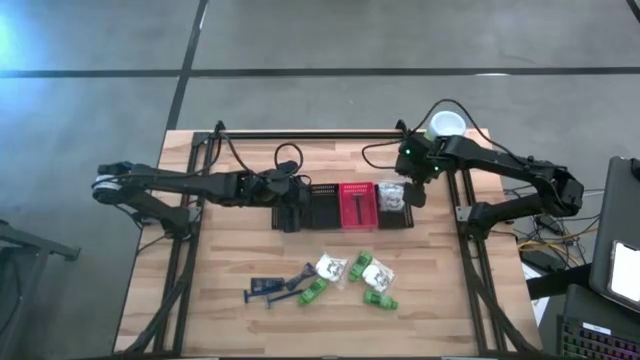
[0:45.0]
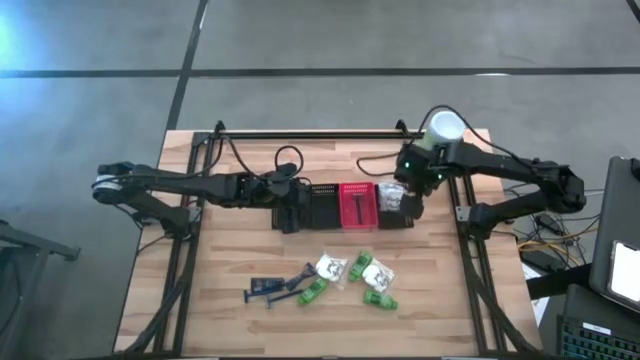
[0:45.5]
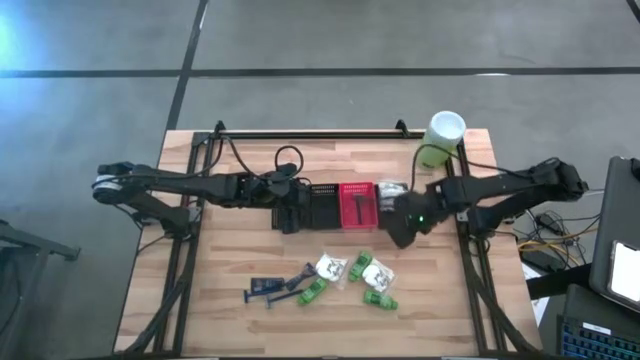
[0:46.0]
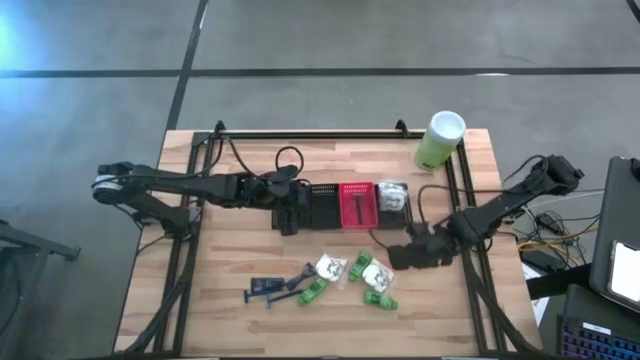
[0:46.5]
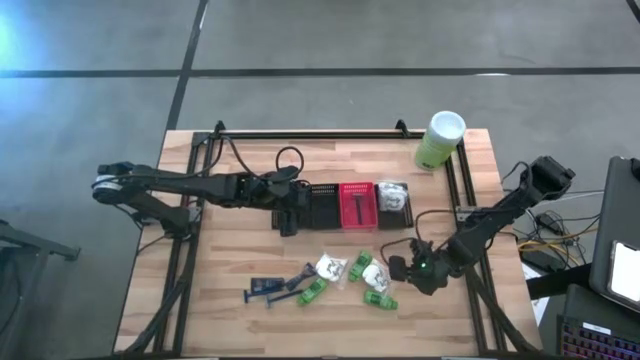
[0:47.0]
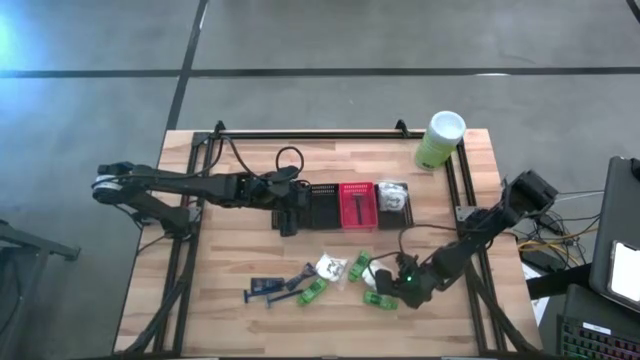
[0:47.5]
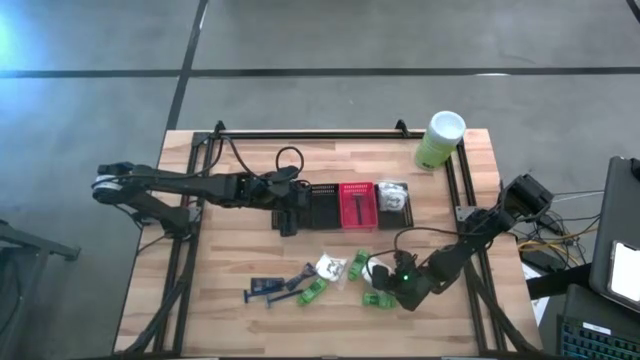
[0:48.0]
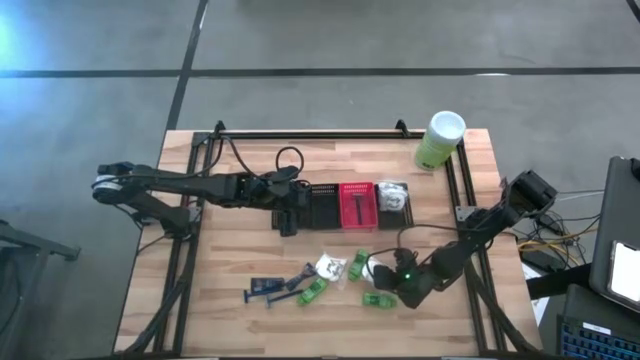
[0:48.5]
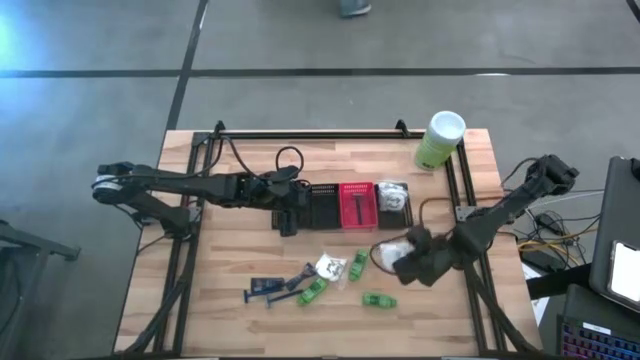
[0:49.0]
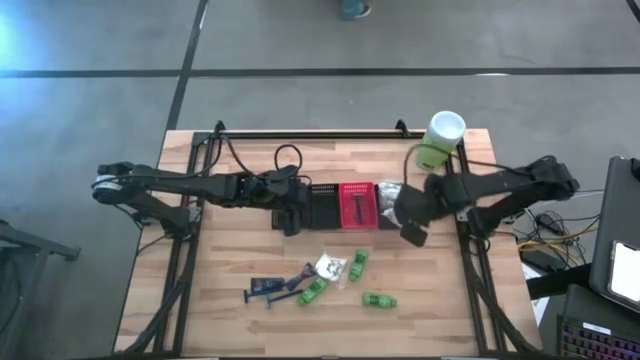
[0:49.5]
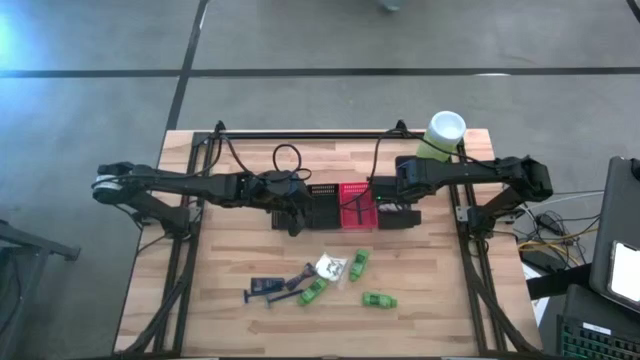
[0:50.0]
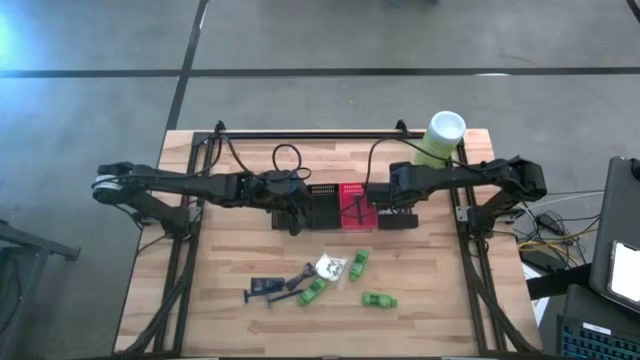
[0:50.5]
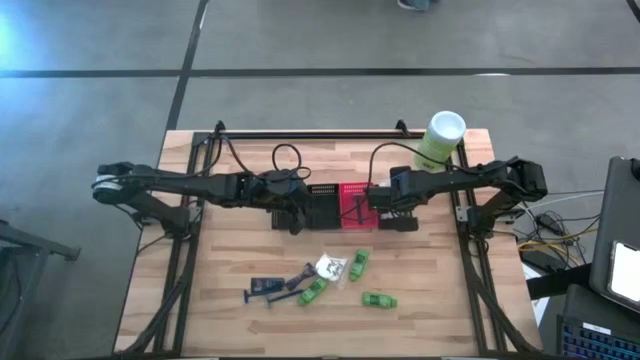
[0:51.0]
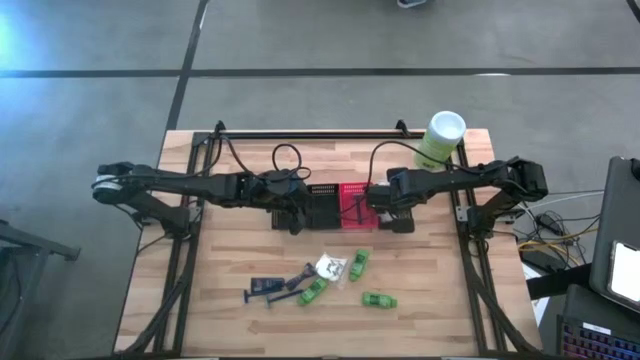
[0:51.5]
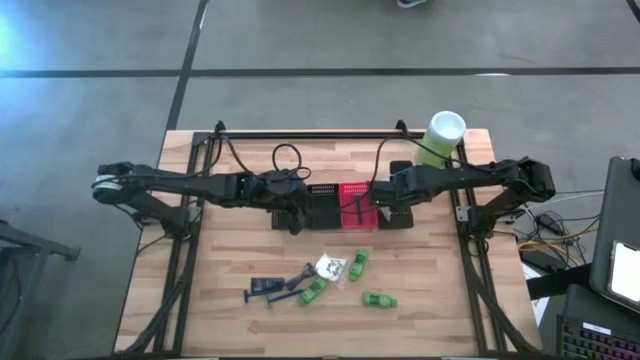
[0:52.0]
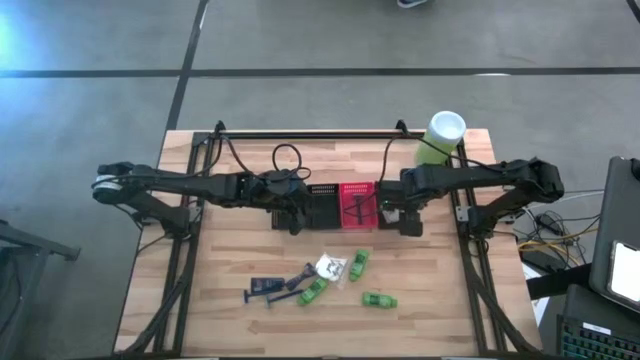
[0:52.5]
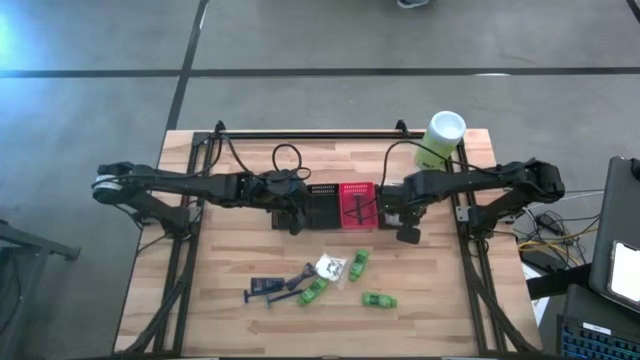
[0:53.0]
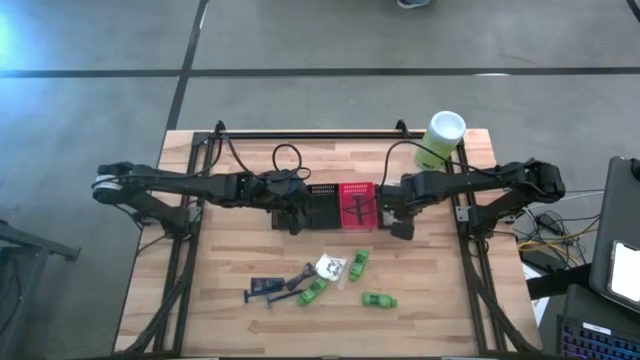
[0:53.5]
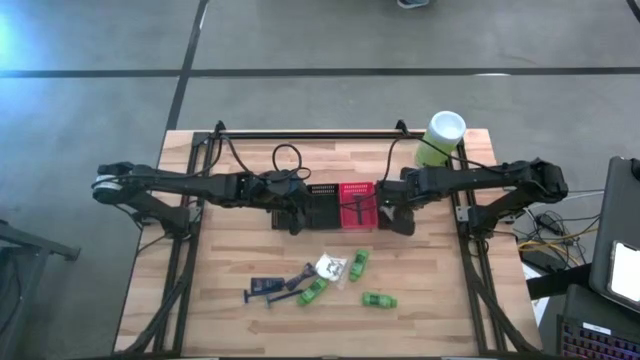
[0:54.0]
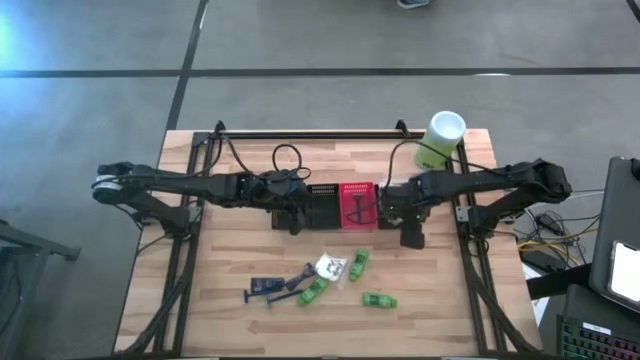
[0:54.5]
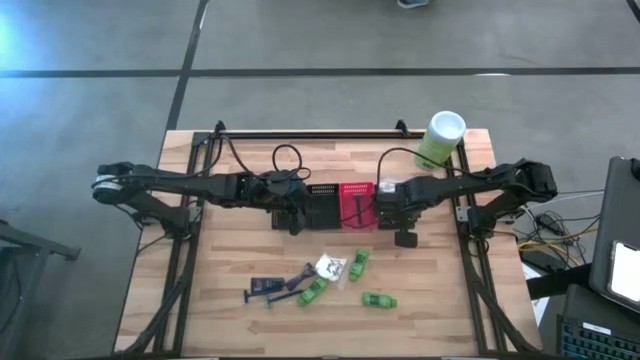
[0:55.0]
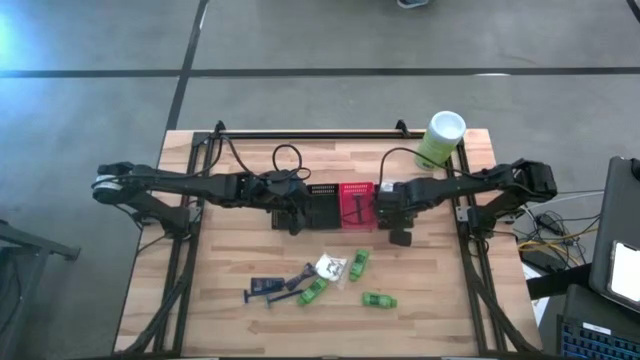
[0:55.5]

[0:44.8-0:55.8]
Task: Pick & Place Travel size toiletries
Put the white cotton pack into the right black basket

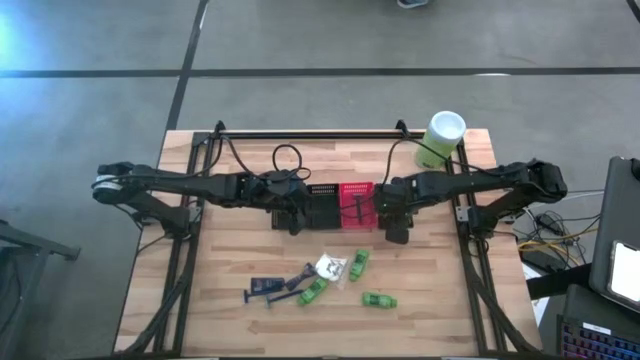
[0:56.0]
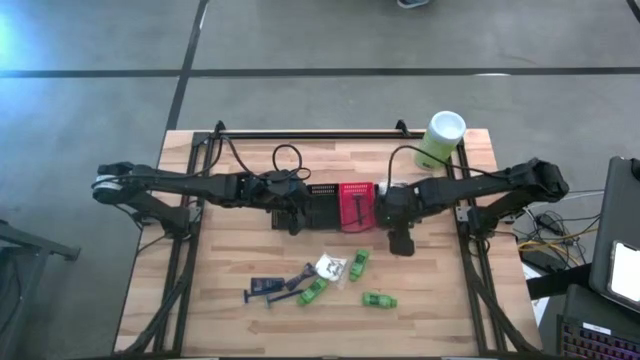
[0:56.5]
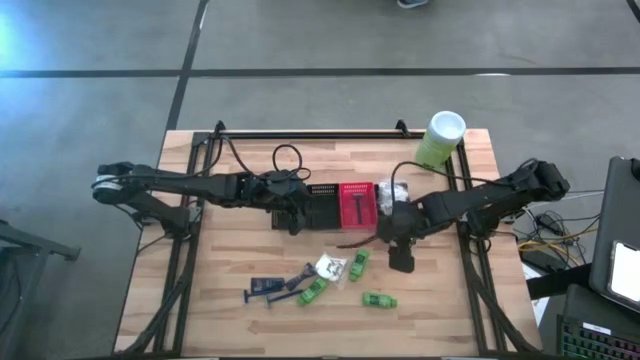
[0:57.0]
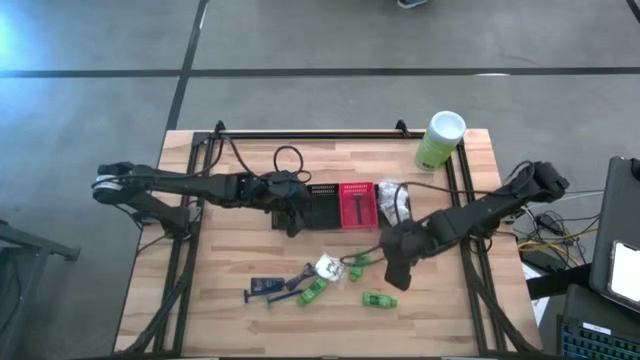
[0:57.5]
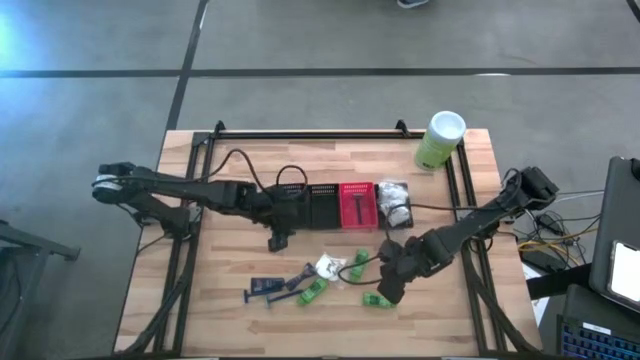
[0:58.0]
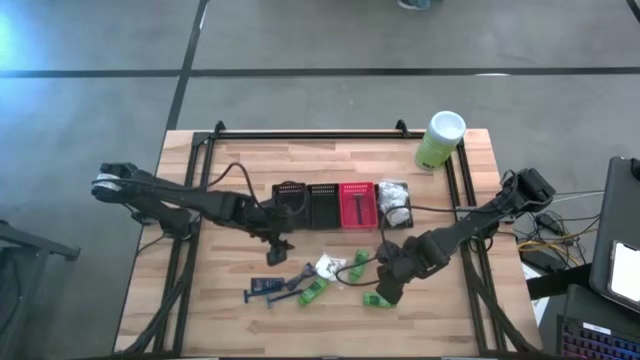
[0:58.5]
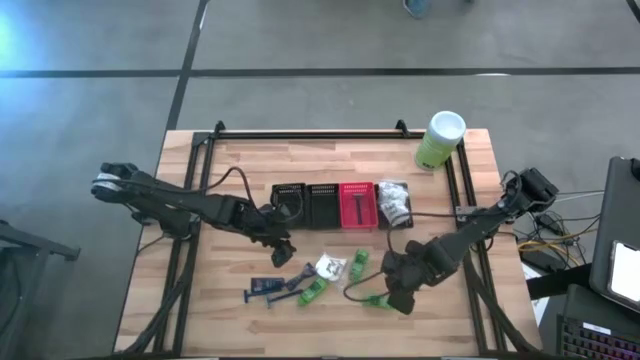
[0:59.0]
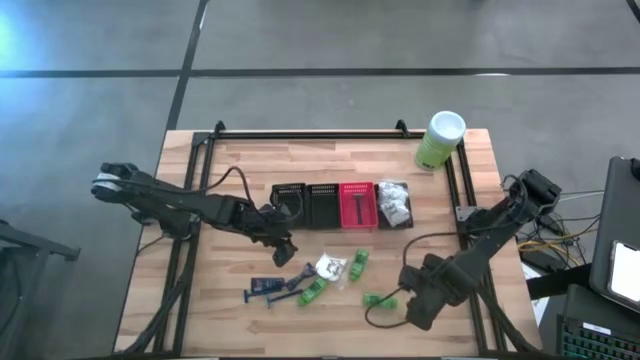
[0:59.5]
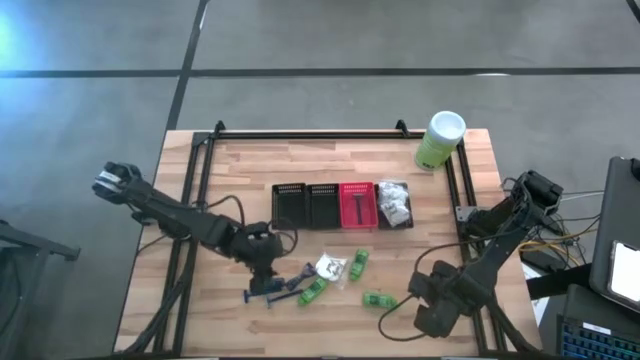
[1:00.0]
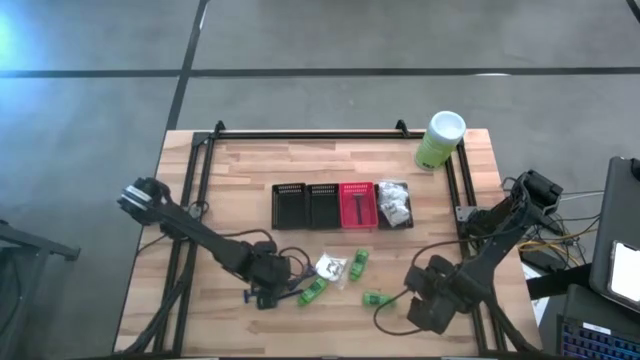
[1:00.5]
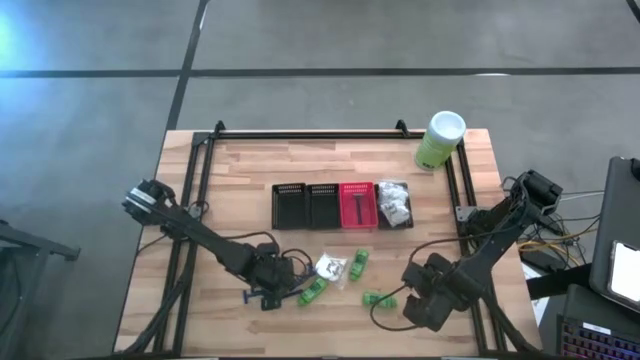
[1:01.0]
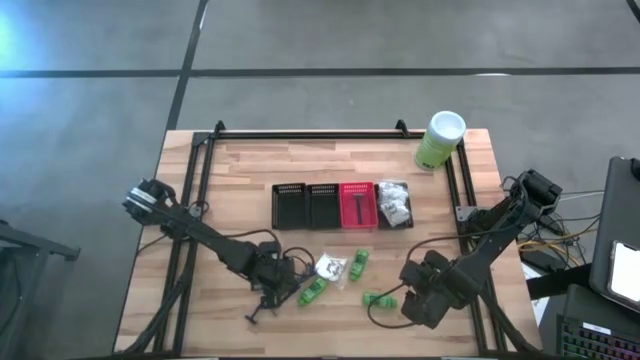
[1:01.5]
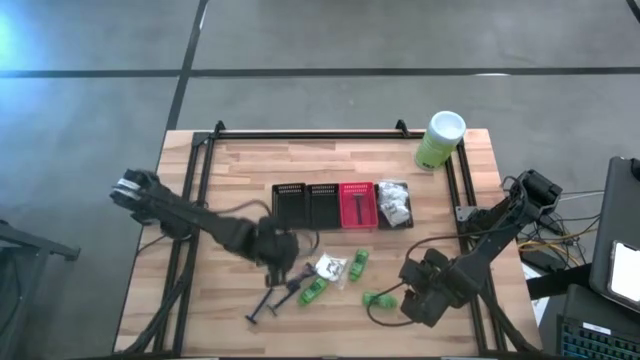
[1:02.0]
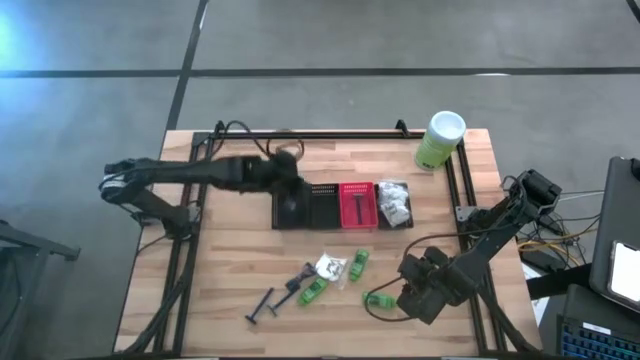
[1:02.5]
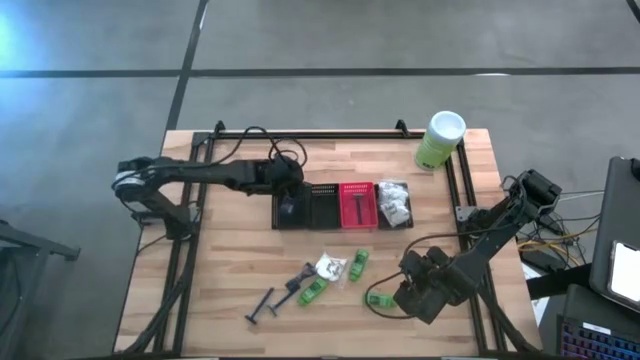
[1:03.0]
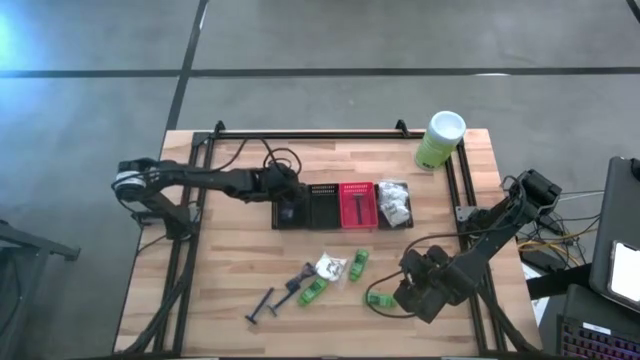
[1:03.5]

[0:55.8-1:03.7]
Put the blue shave cream into the left black basket

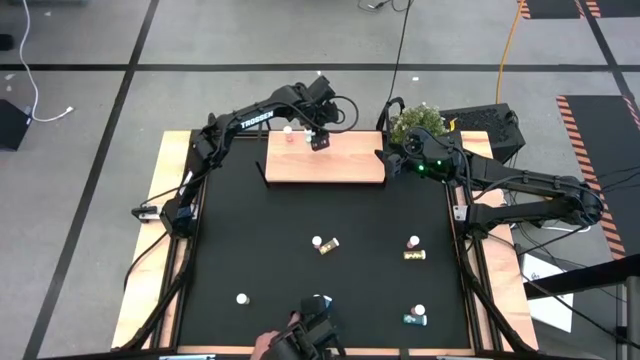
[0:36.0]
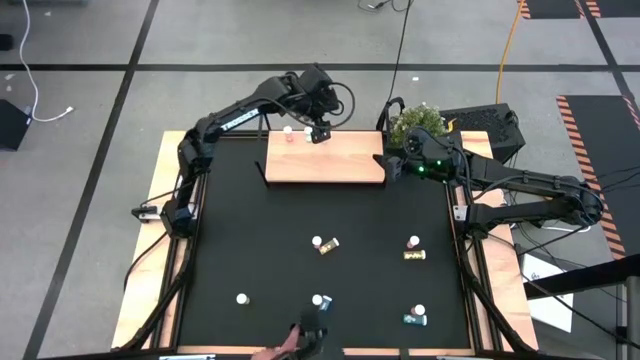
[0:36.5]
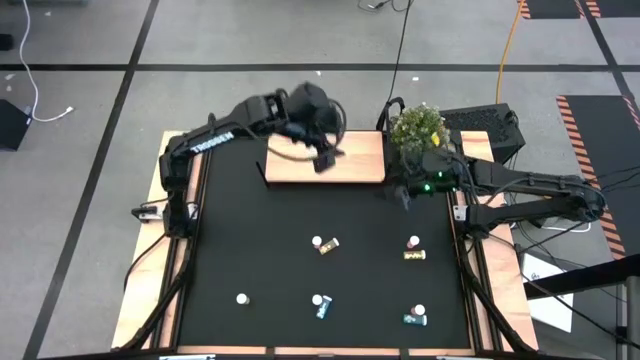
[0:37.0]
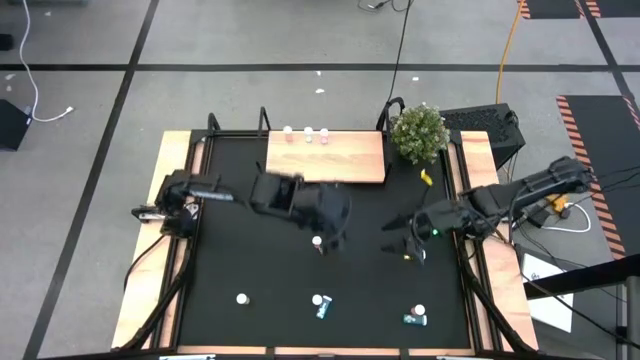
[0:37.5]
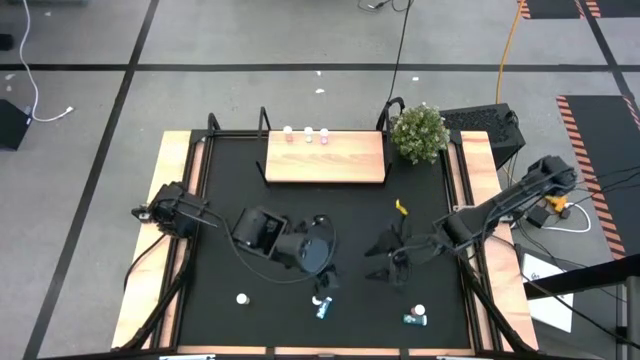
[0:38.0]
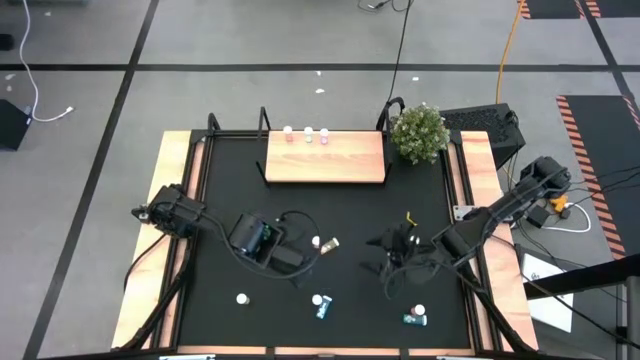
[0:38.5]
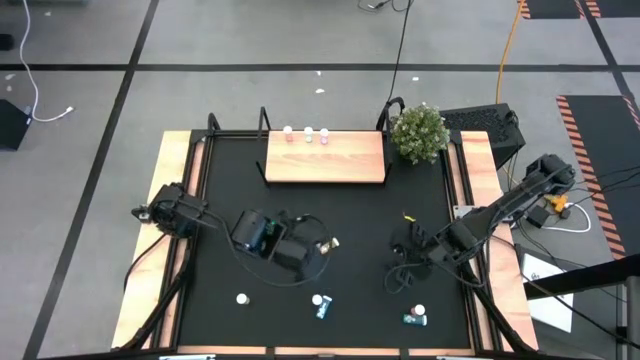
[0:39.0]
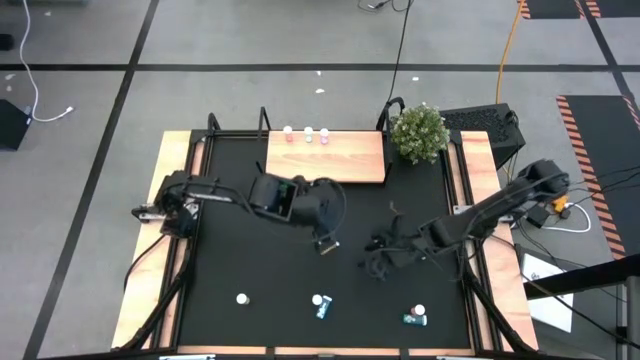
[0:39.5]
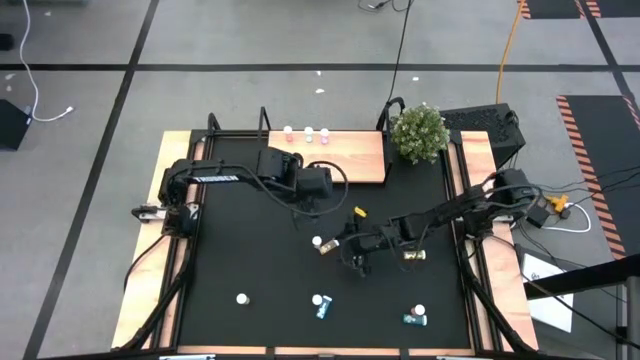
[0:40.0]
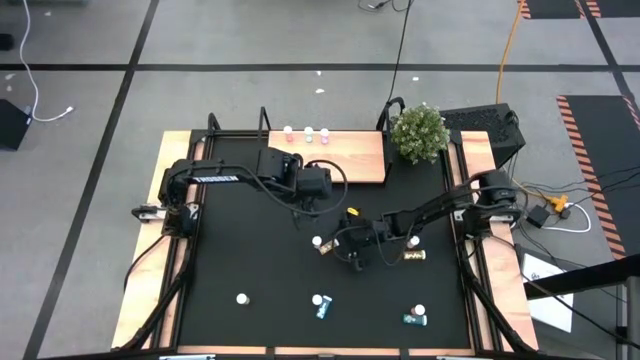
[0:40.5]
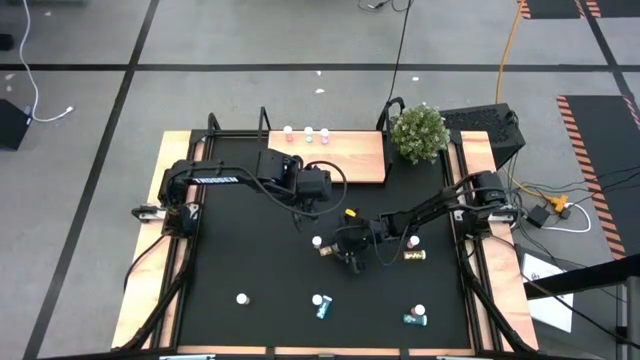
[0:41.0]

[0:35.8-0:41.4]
Task: Pick and place medicine bottles onto shelf by color
Put the top left yellow pill bottle on the shelf
